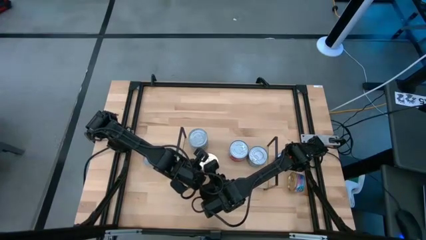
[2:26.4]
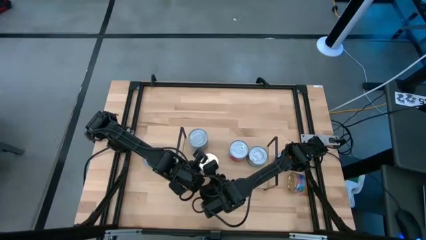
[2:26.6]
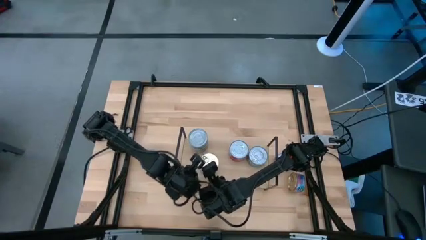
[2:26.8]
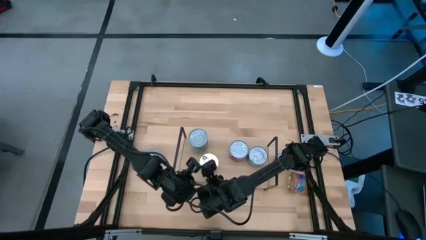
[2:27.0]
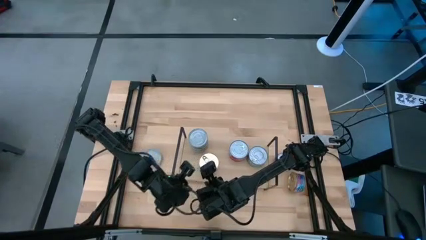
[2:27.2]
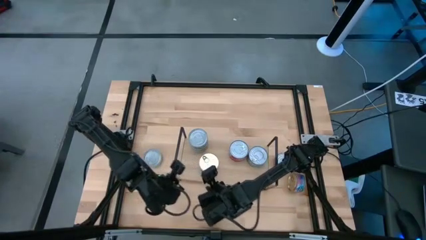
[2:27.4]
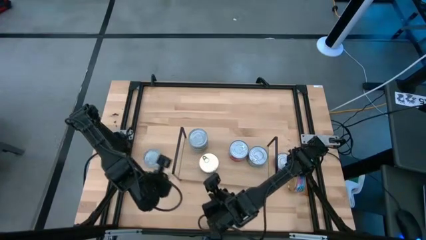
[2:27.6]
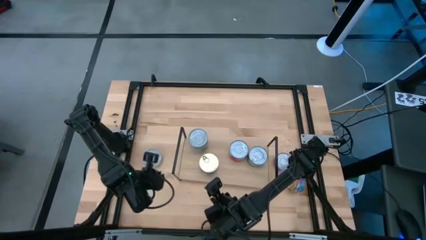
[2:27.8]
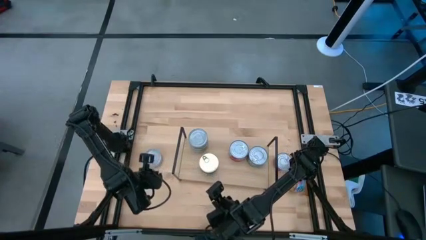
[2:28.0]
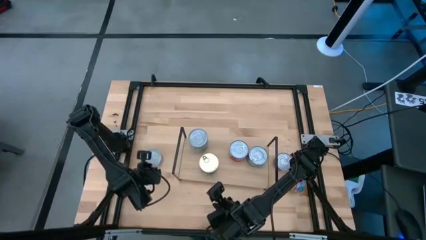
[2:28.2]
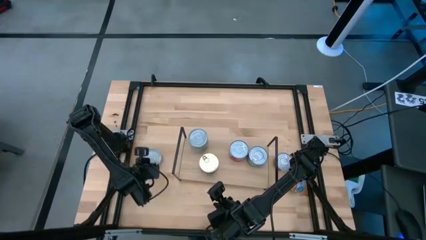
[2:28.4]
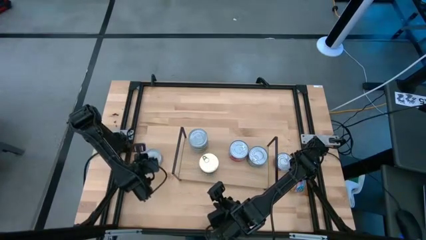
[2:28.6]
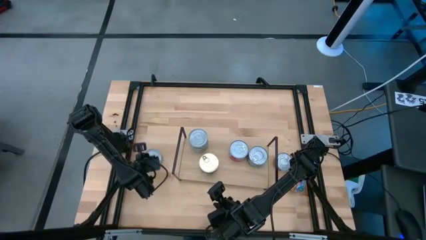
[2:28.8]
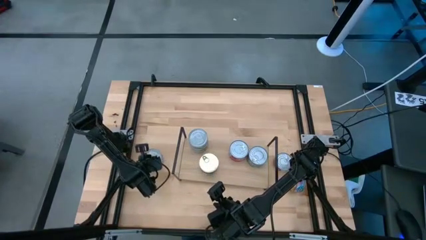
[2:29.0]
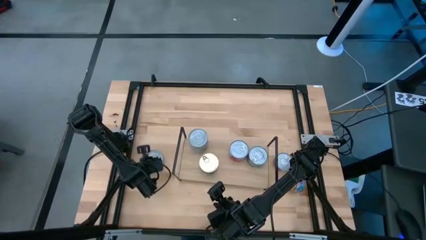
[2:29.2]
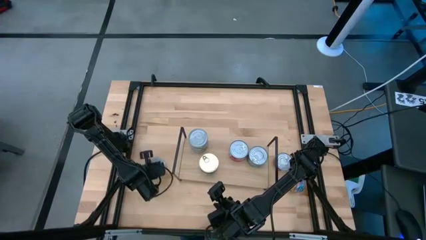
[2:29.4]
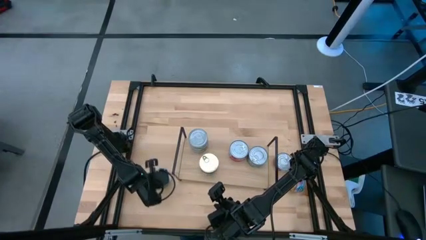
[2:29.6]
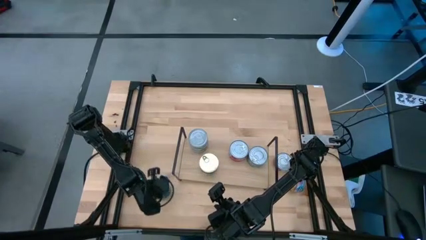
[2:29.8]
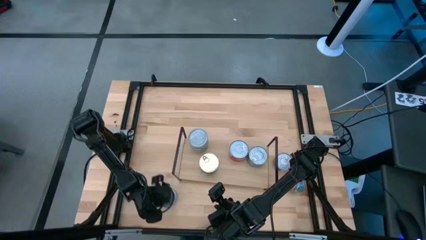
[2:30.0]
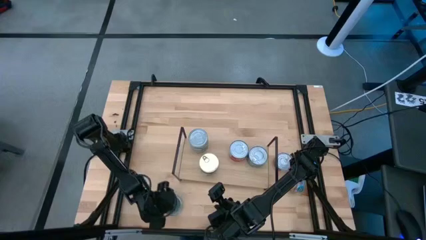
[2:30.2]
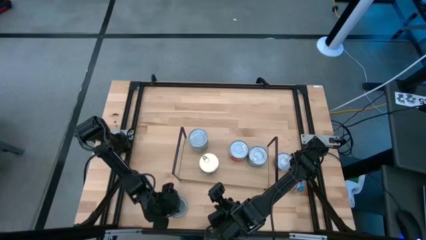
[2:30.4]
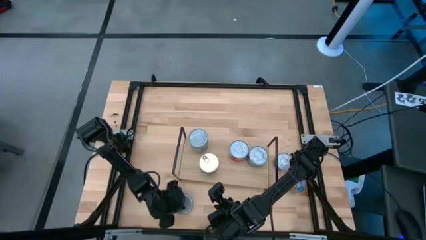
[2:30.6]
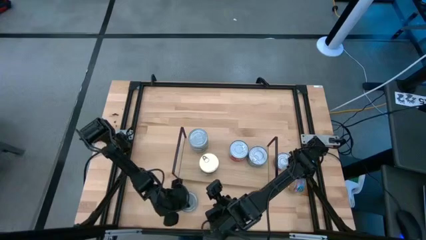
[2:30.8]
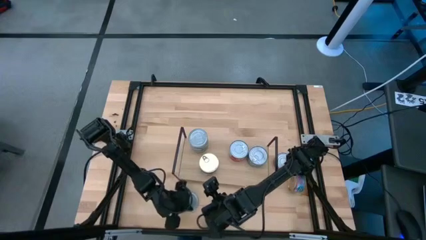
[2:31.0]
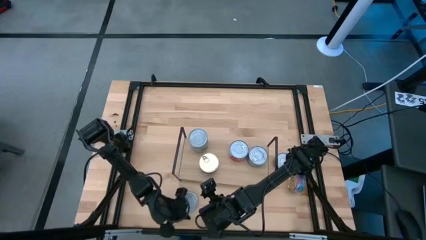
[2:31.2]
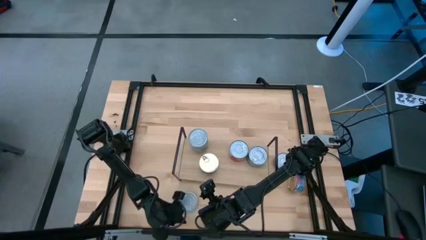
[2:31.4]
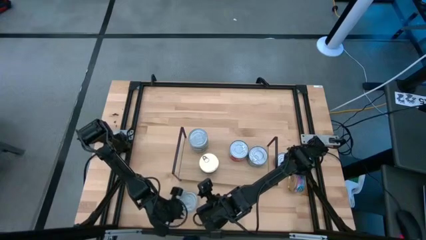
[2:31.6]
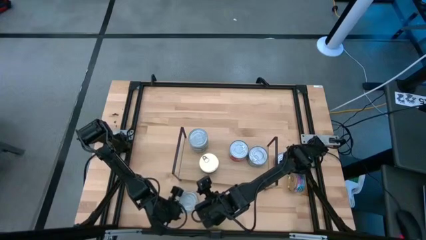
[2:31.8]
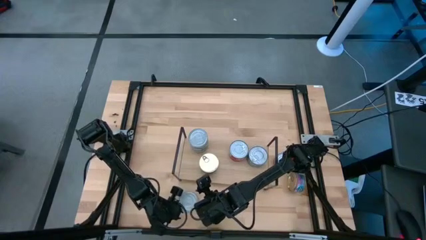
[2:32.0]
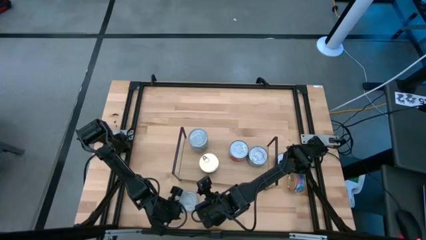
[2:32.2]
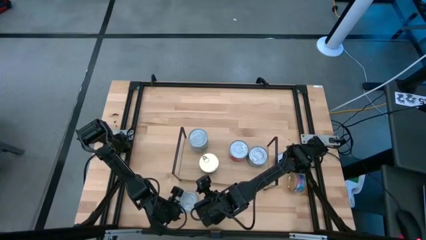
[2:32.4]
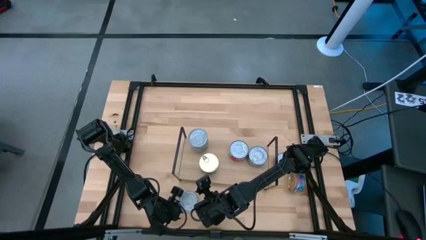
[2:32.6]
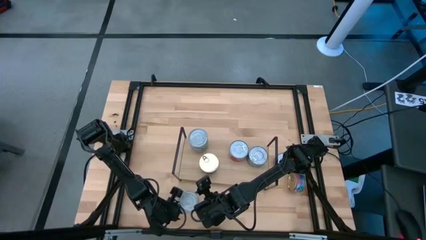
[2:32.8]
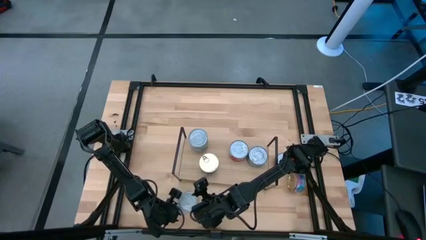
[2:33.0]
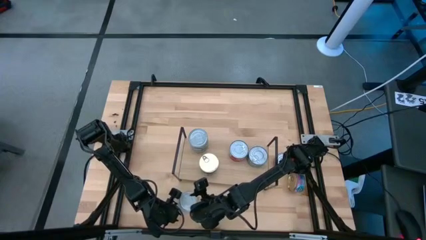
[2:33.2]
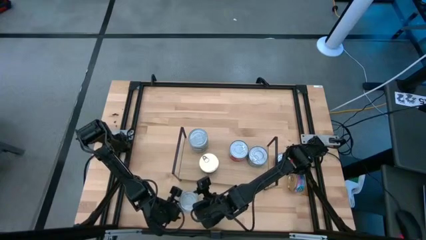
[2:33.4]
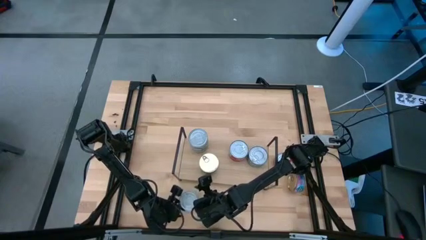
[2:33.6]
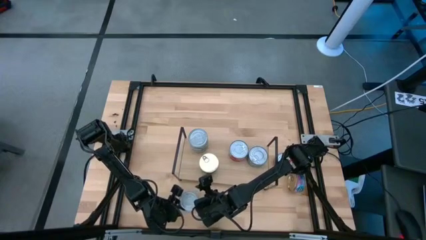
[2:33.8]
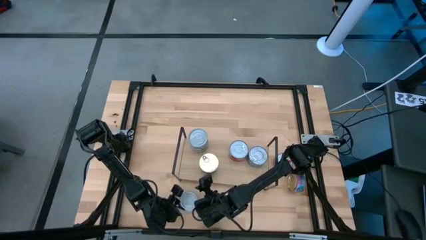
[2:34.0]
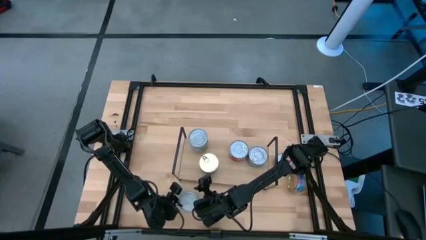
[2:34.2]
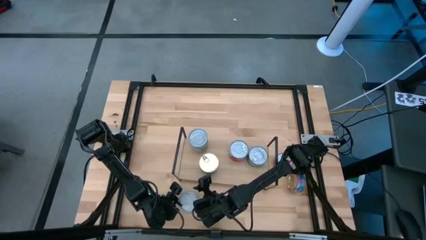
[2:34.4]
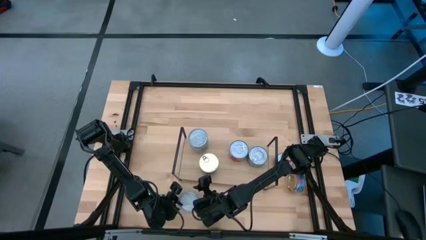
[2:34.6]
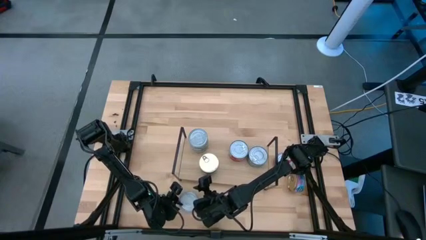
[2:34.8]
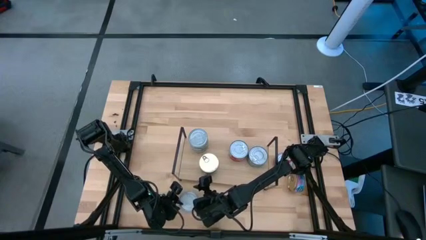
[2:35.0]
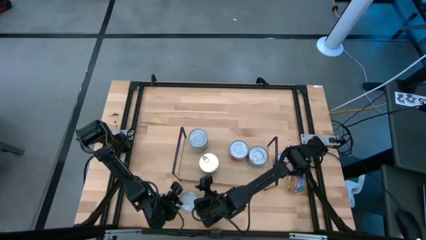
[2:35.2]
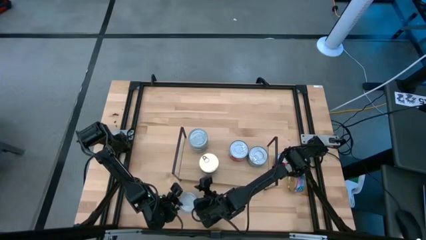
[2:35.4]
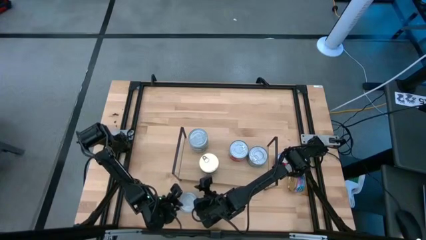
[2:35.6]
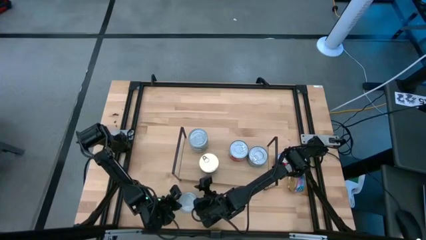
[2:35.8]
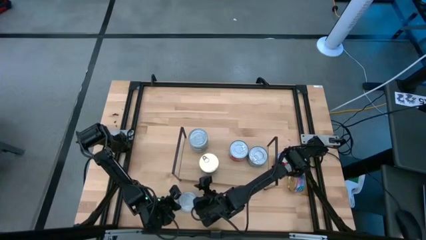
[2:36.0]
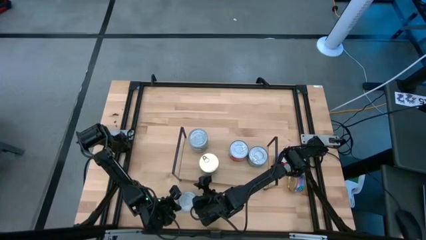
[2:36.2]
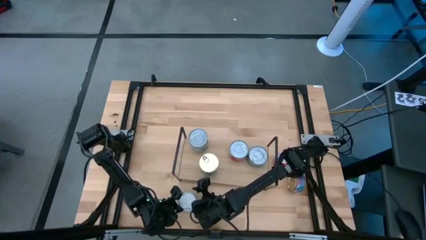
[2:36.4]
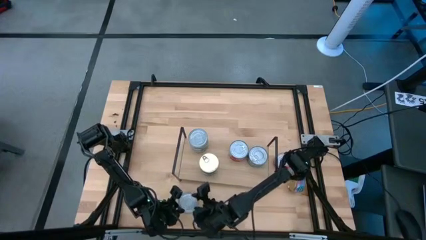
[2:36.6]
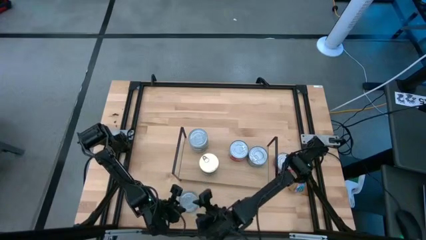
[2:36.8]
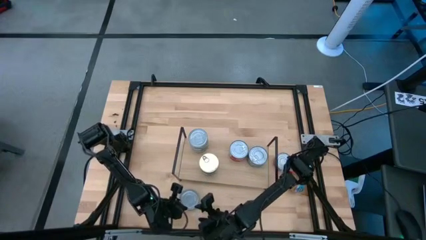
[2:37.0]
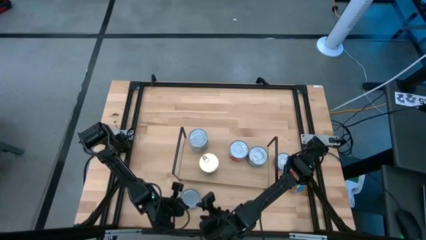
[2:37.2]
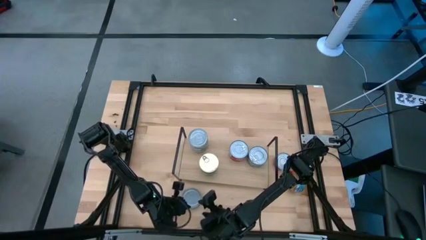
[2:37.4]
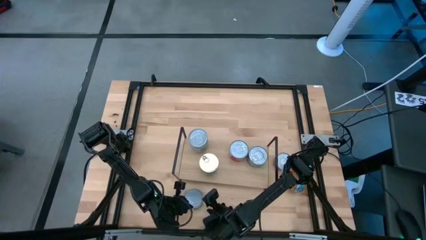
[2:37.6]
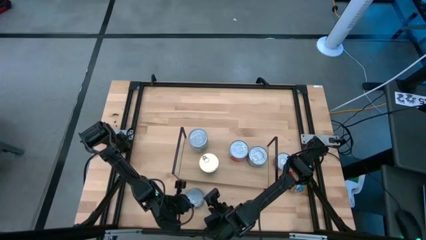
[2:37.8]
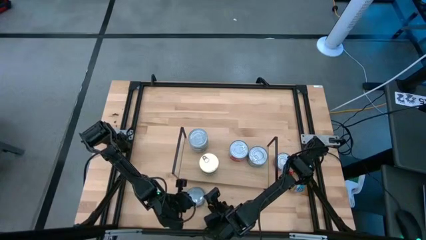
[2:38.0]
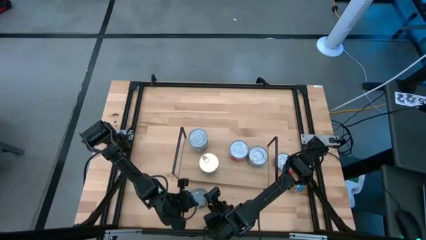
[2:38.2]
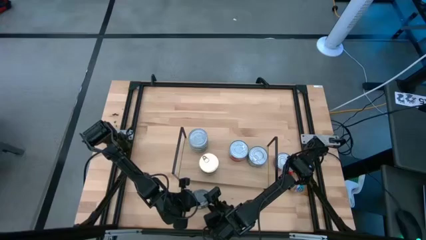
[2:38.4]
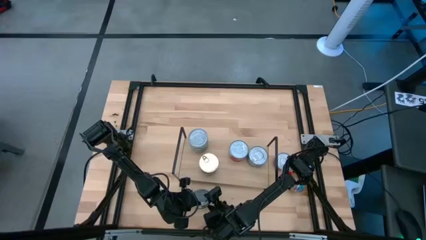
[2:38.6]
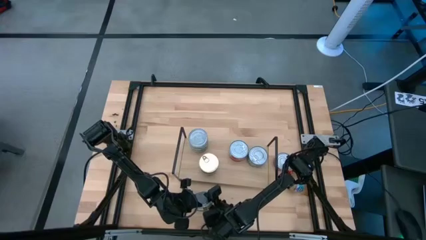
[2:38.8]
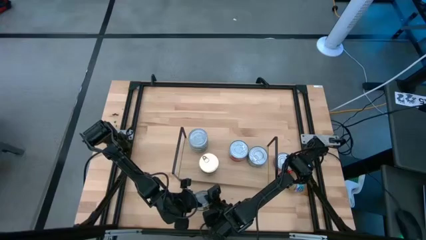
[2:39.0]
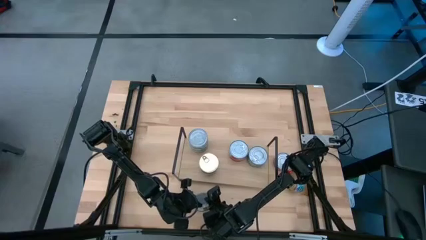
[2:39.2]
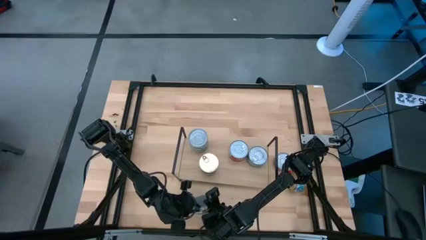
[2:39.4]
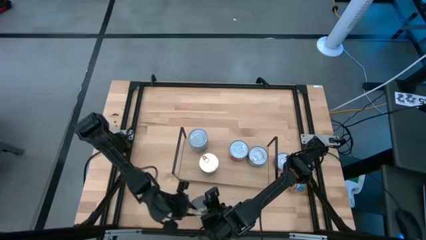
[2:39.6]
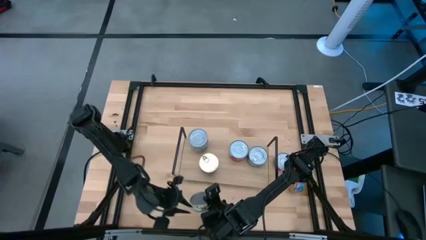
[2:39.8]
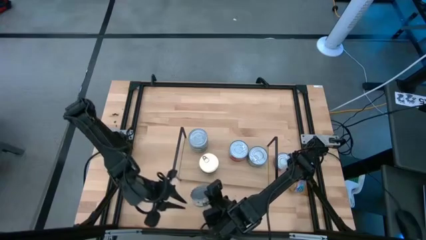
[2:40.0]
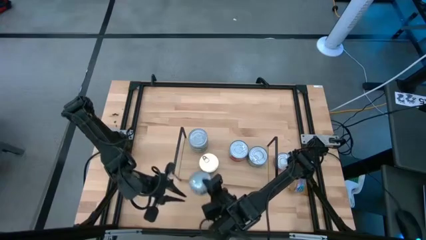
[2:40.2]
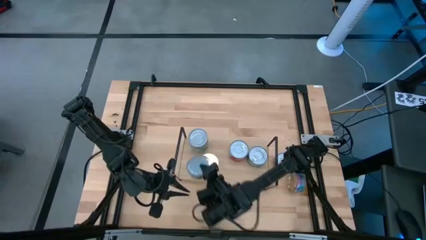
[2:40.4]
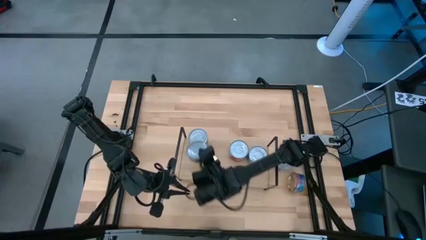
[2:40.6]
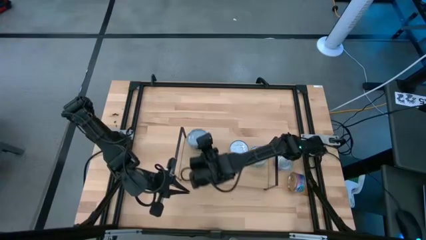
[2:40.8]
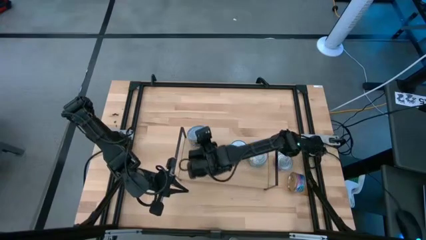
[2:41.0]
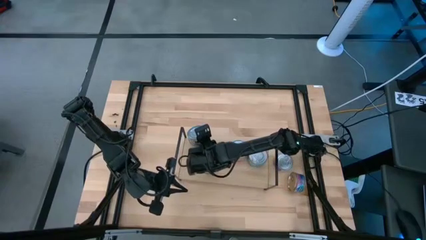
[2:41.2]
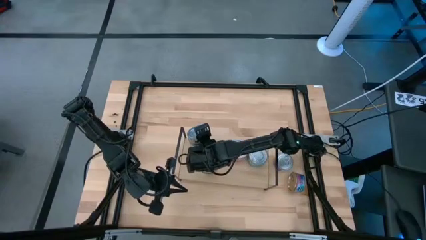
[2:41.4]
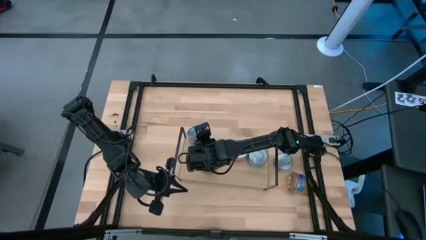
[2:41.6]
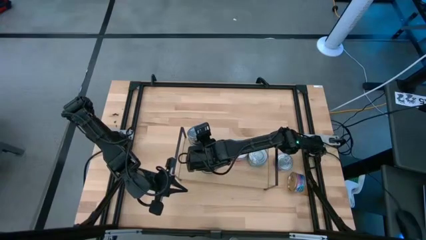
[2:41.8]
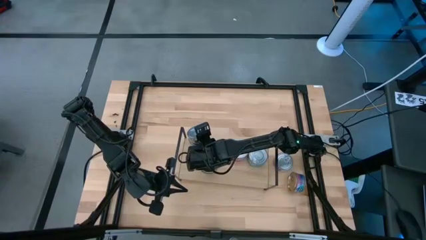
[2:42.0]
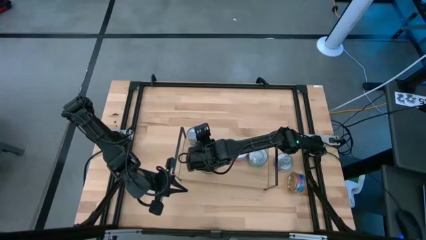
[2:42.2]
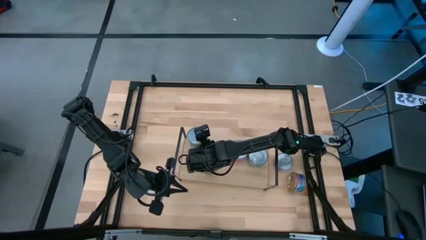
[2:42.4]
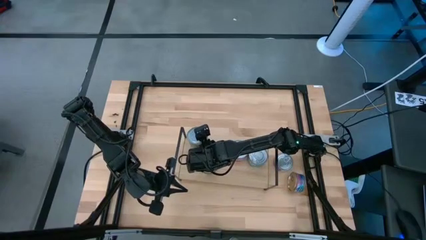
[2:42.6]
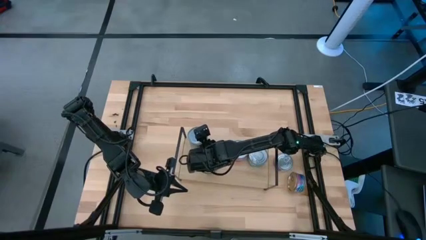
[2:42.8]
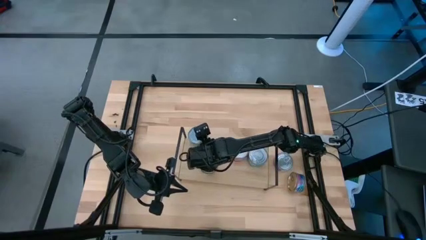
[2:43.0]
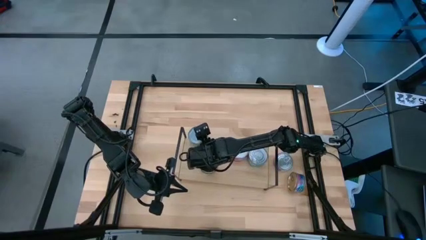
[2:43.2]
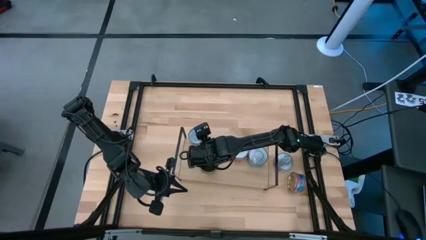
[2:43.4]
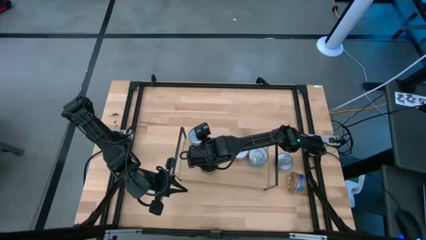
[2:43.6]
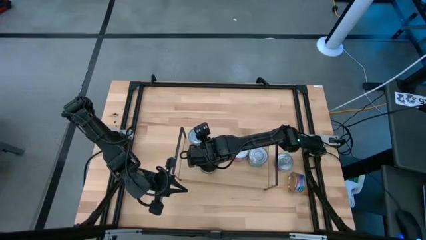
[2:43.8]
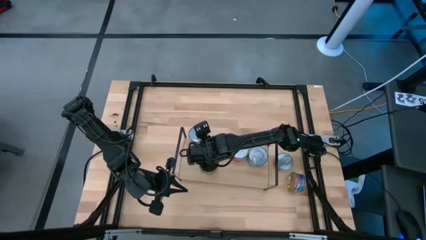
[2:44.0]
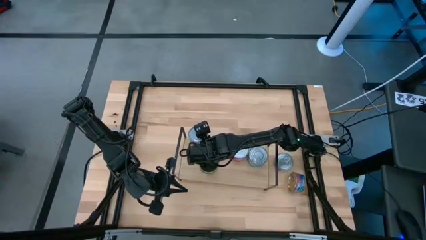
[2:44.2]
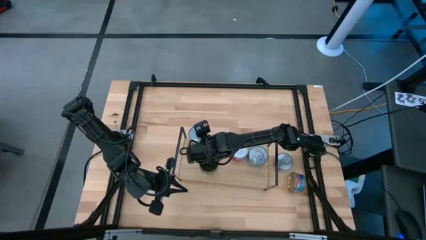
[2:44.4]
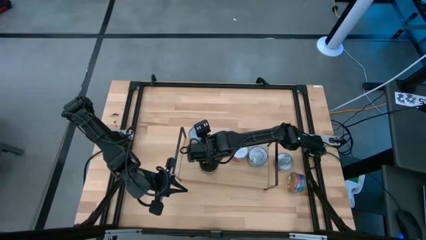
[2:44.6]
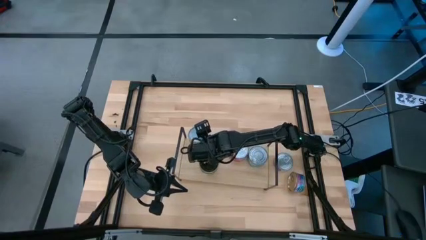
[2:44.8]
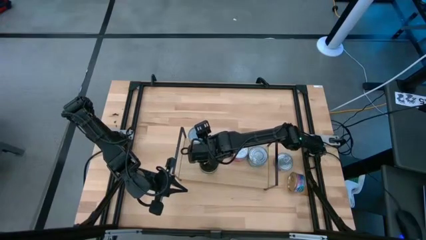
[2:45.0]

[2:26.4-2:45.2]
Task: Stack canned seafood by type on shelf
Stack the green white tuna can on top of the green white tuna cans on the shelf
